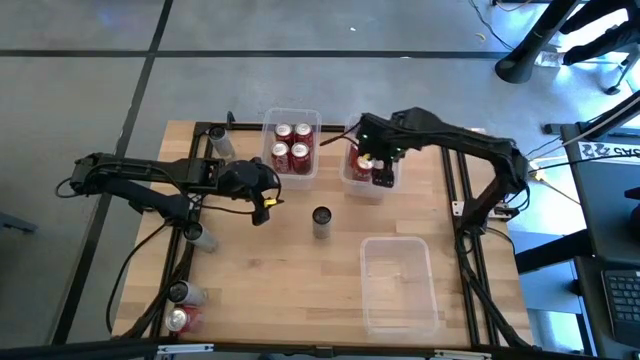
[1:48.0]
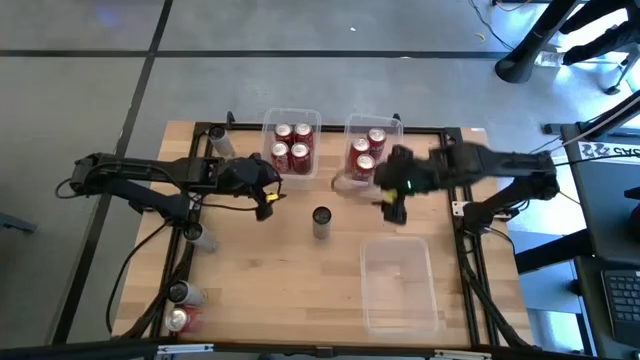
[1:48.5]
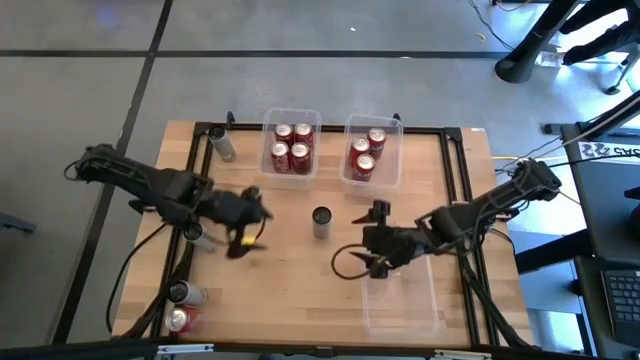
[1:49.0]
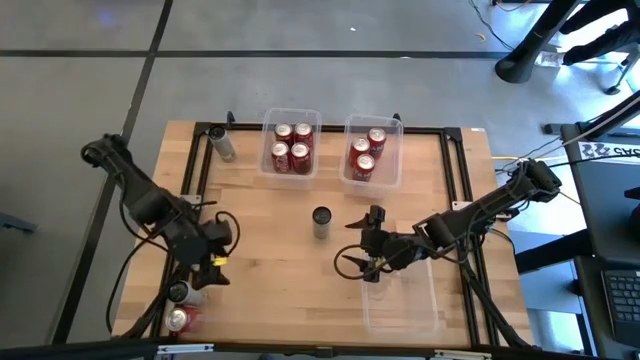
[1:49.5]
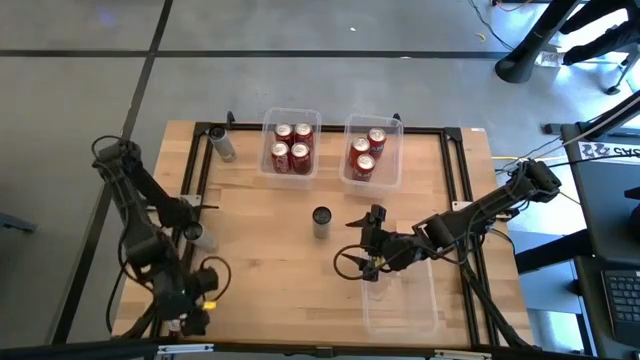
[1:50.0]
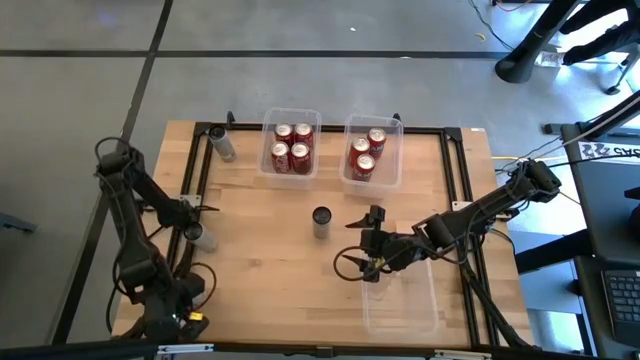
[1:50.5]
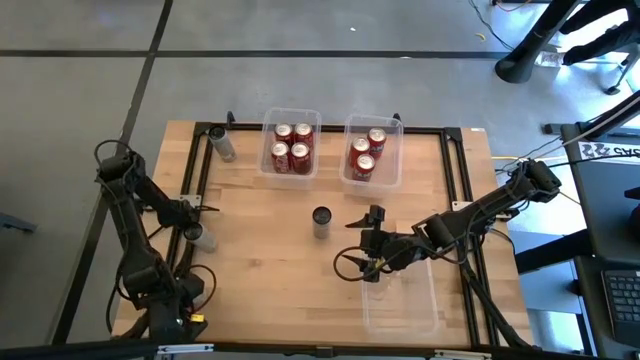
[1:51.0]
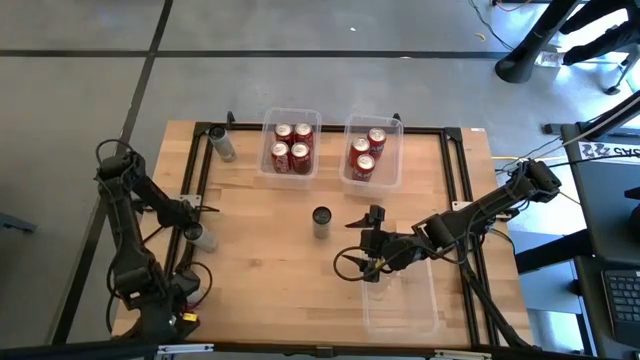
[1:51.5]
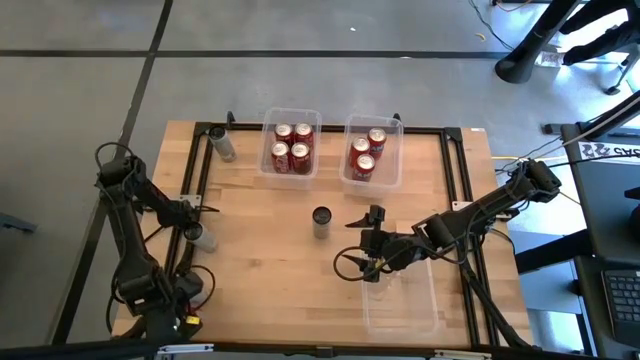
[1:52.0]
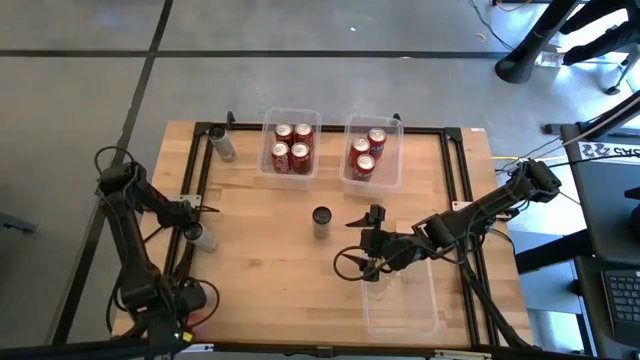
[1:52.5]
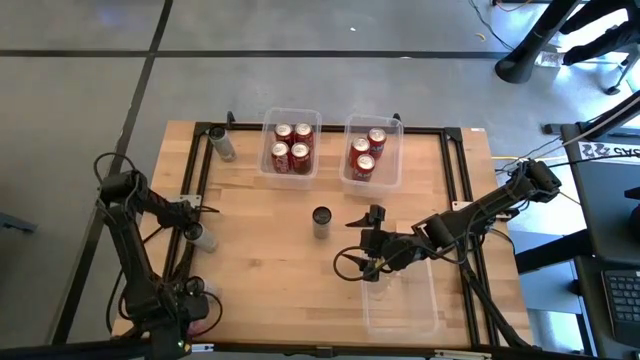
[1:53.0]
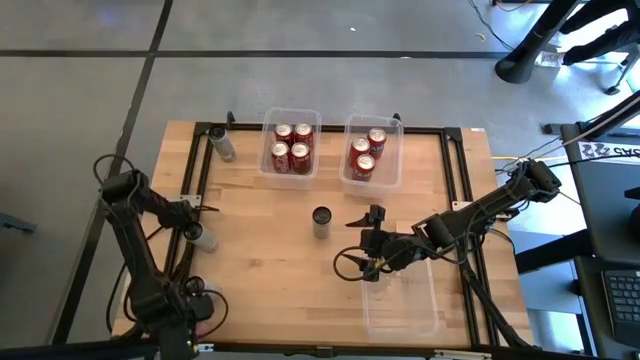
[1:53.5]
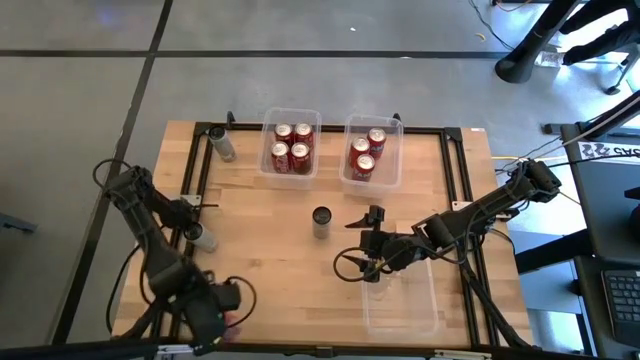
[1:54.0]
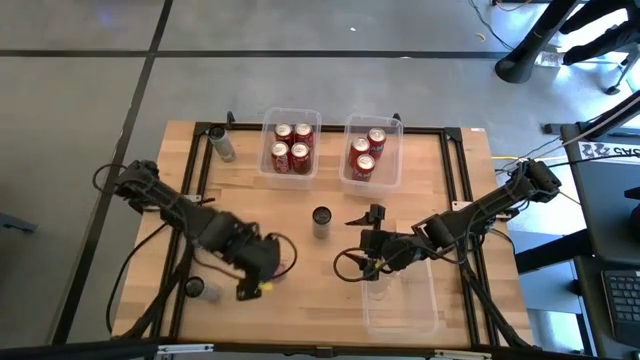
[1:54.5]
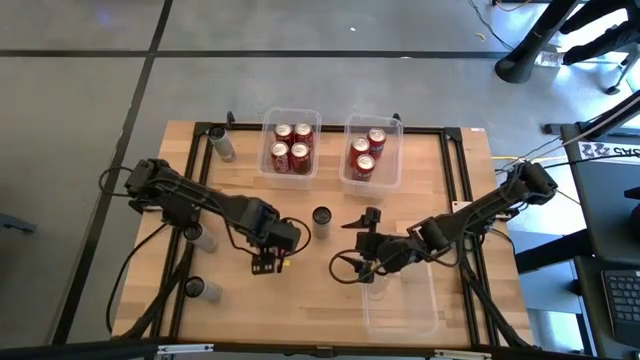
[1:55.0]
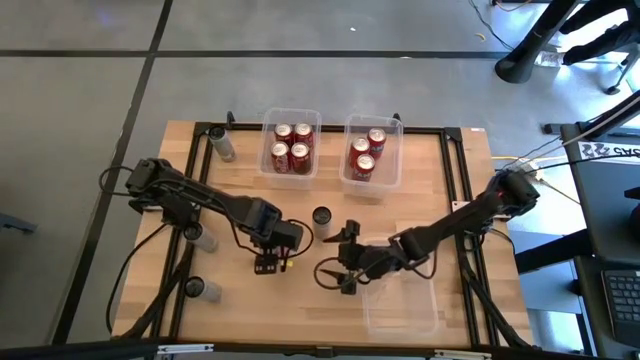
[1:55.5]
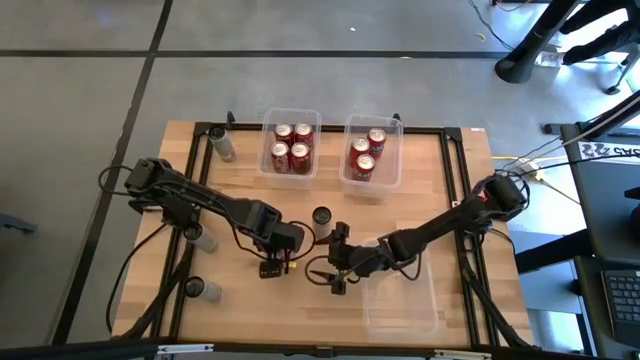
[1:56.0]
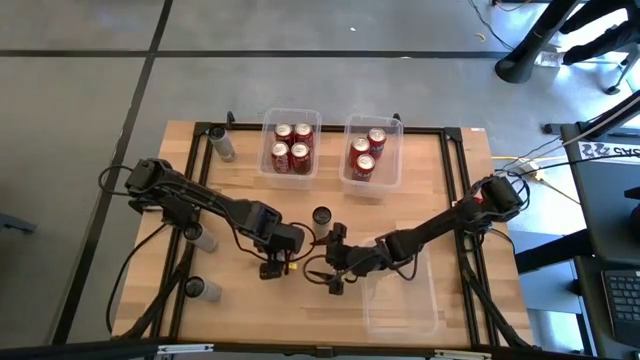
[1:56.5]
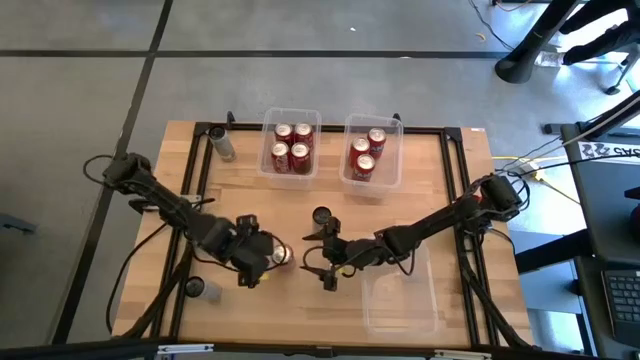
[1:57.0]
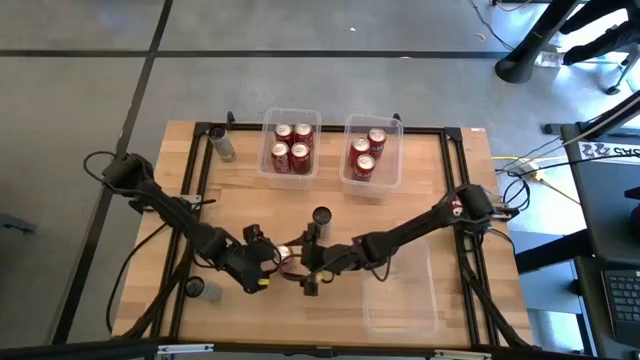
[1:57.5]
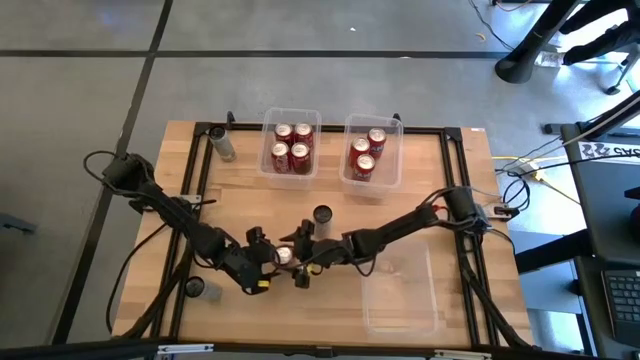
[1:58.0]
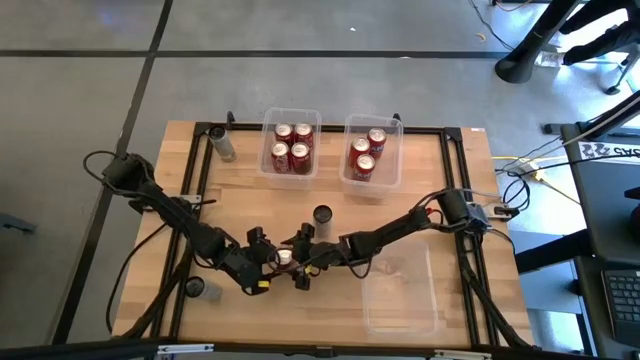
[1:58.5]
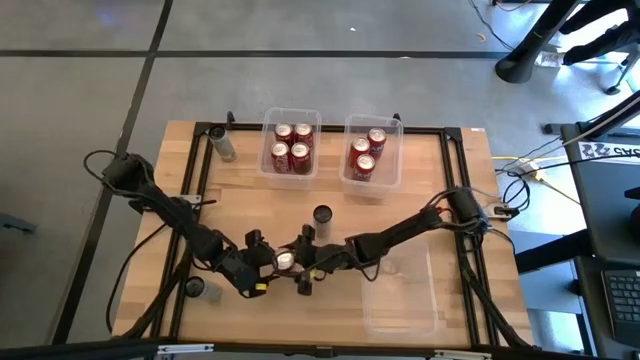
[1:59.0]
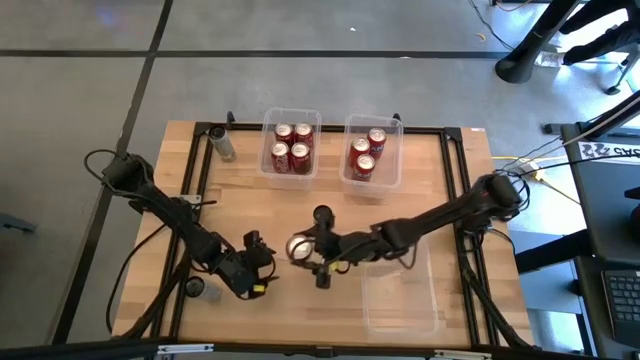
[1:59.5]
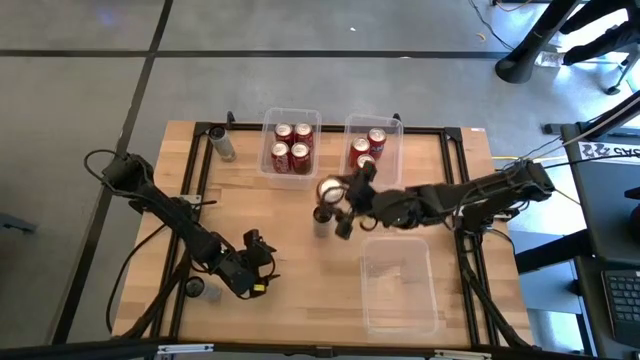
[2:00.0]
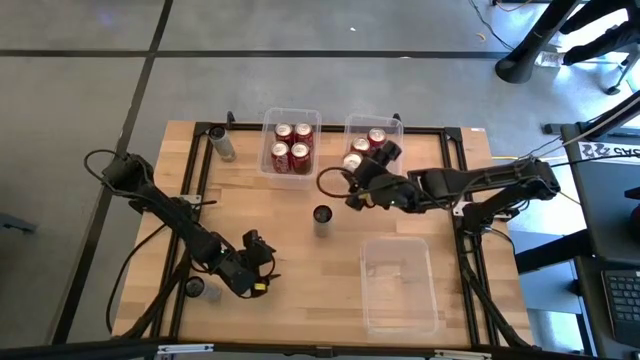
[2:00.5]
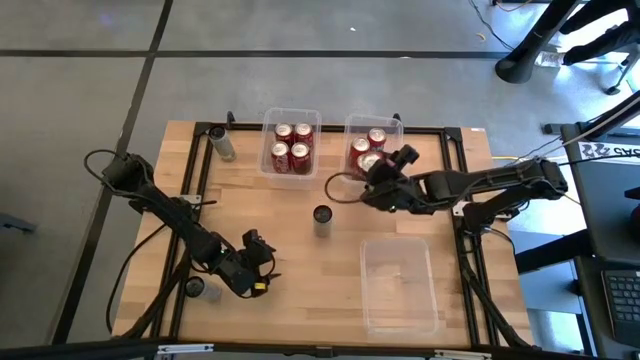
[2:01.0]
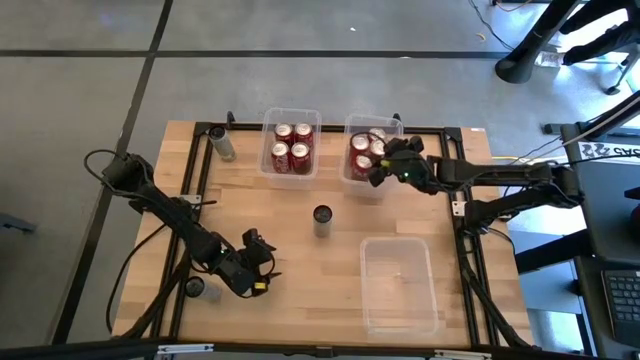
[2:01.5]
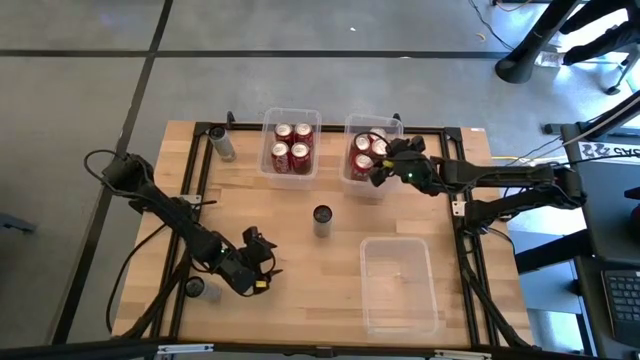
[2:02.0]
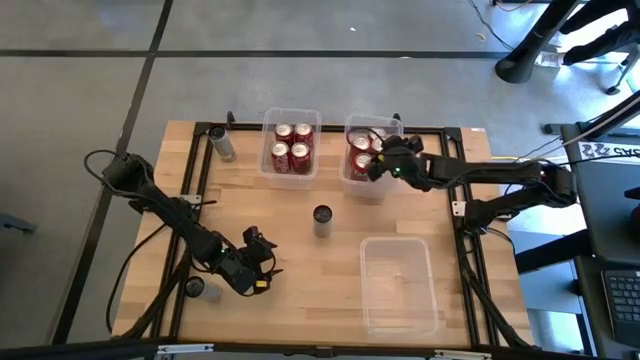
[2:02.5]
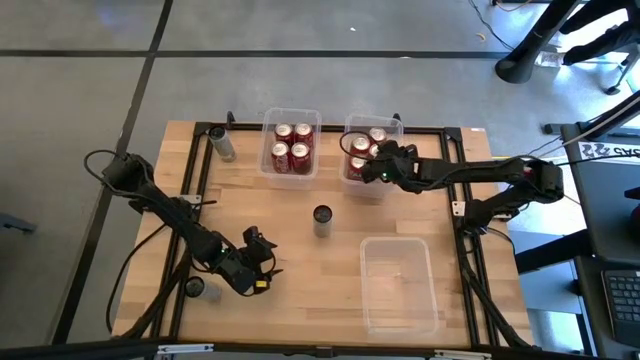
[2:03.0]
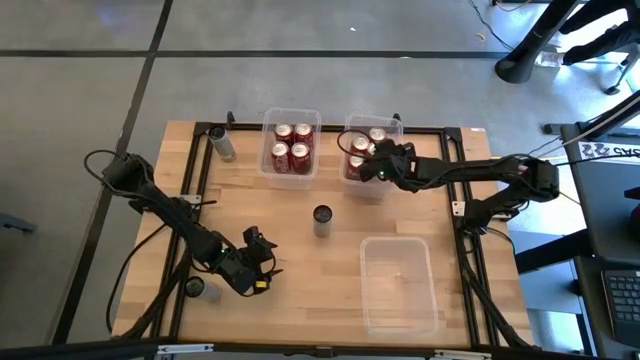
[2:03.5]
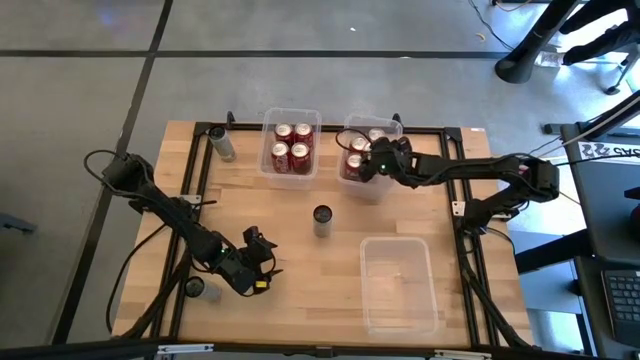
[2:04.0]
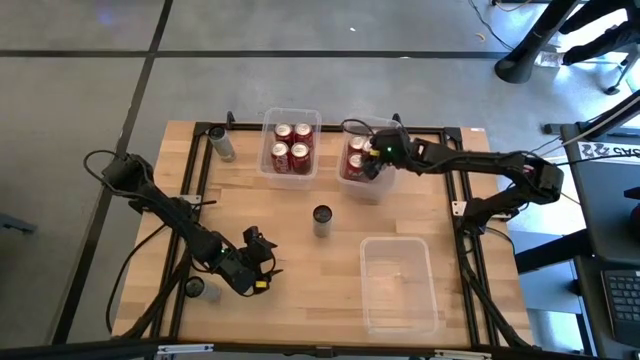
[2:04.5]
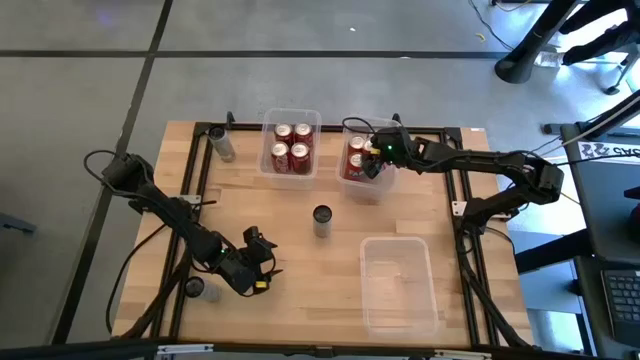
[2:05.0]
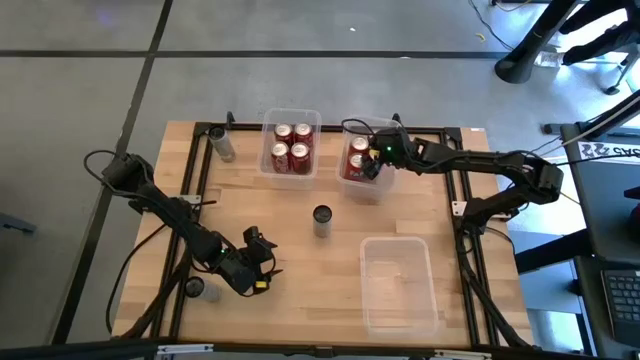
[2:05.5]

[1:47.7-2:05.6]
Task: Sort soda cans
Put the orange soda can into the top right transparent bin aligned with the other orange soda cans

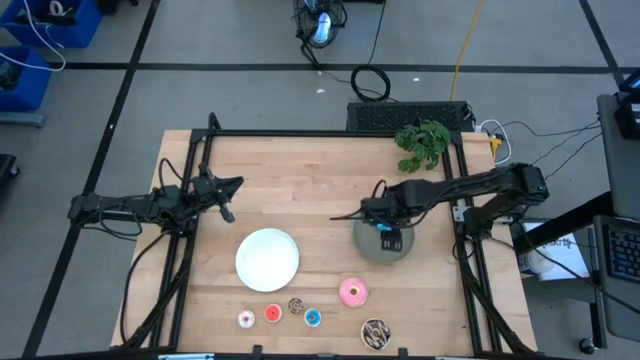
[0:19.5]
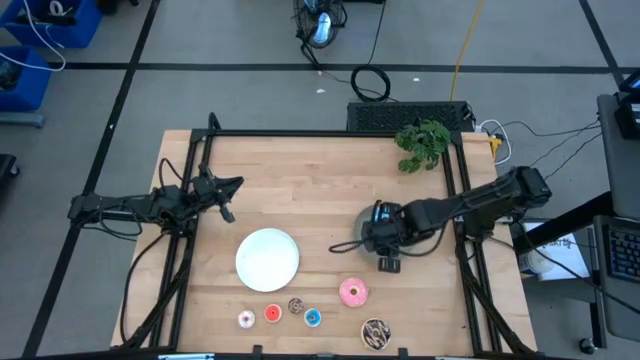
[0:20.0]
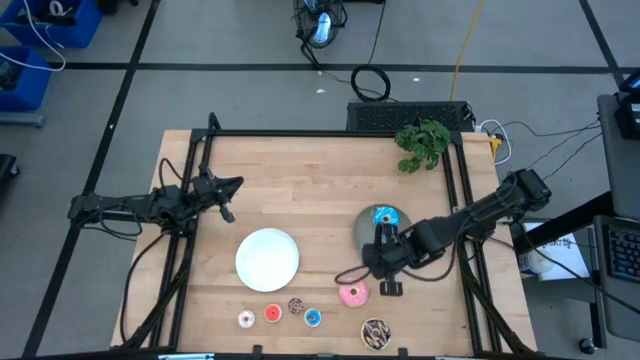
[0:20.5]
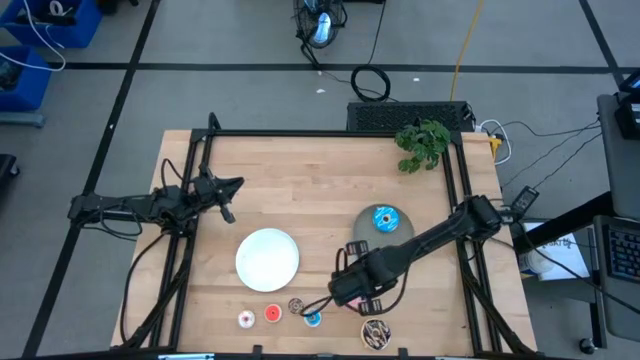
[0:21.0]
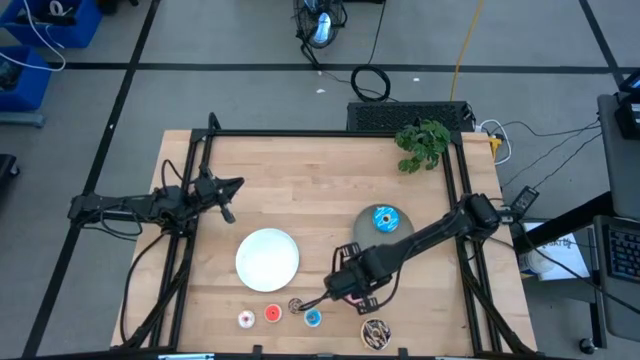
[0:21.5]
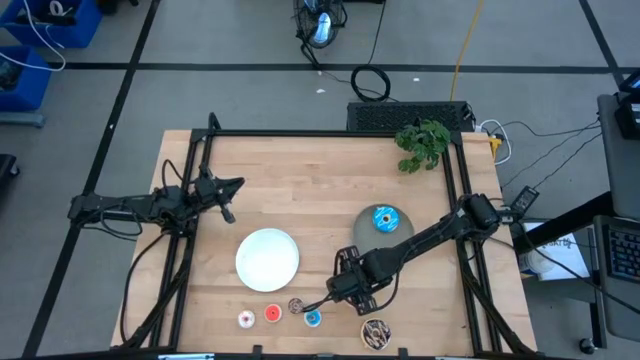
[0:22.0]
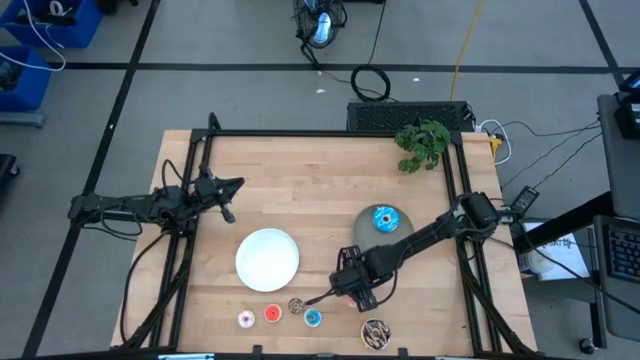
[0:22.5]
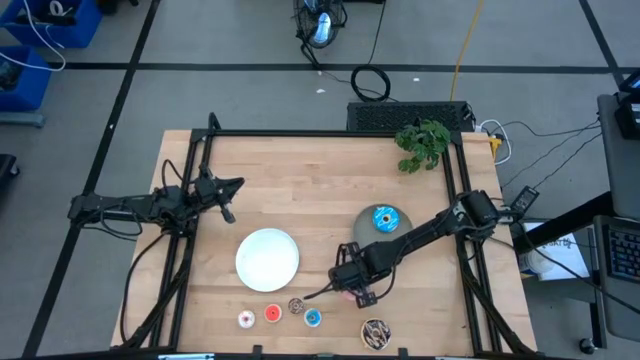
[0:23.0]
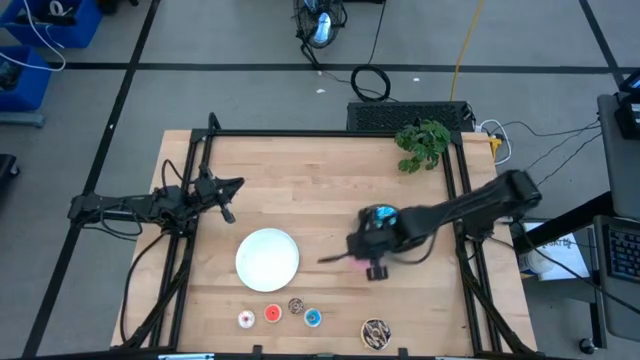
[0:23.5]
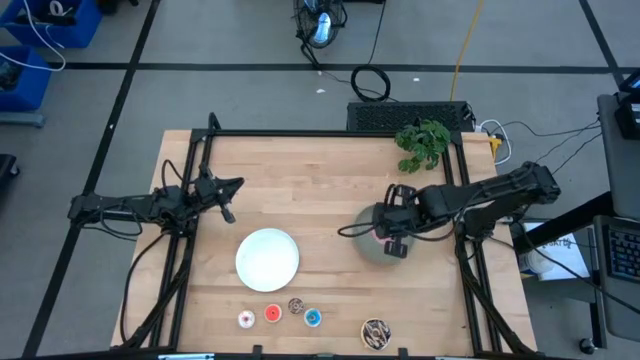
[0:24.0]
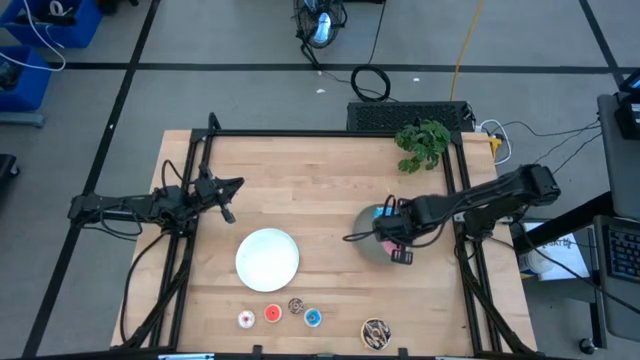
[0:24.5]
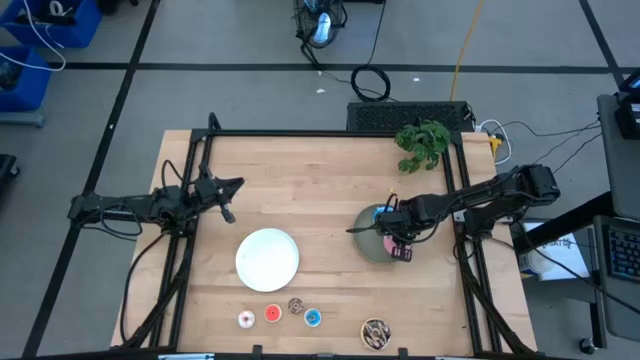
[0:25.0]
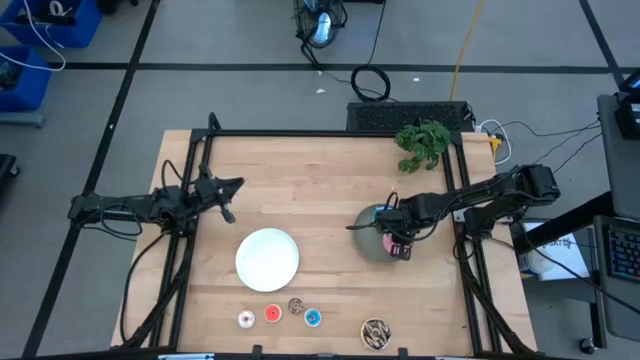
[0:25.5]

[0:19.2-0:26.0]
Task: Pick & Place donuts
Put the large pink donut on the gray plate
